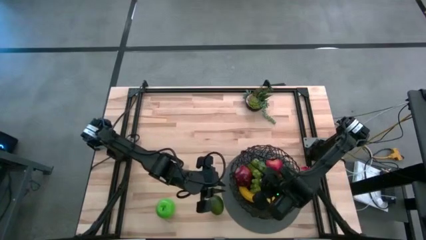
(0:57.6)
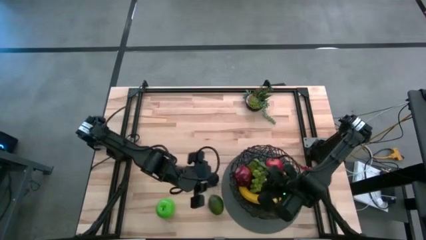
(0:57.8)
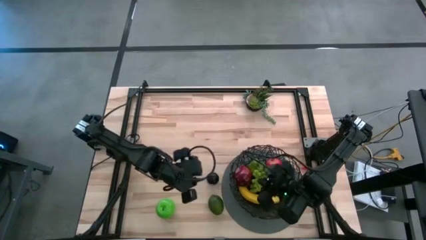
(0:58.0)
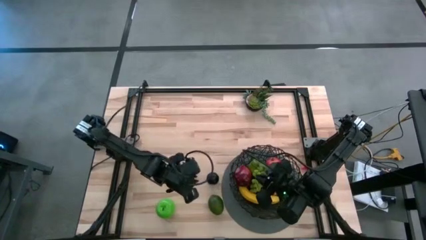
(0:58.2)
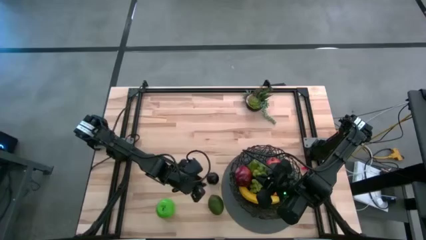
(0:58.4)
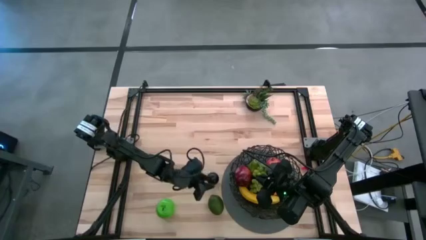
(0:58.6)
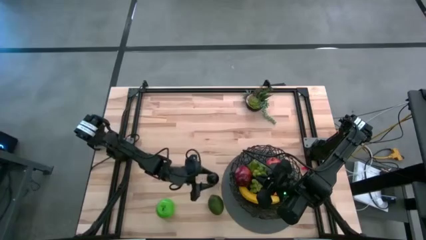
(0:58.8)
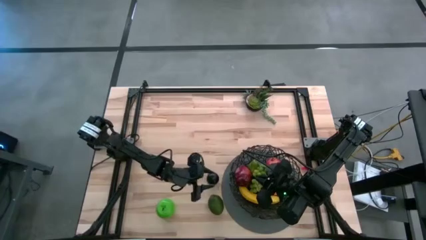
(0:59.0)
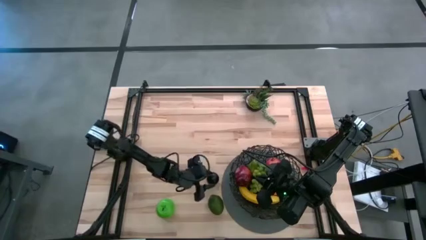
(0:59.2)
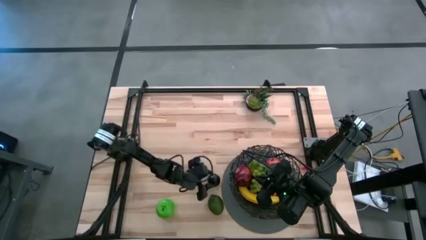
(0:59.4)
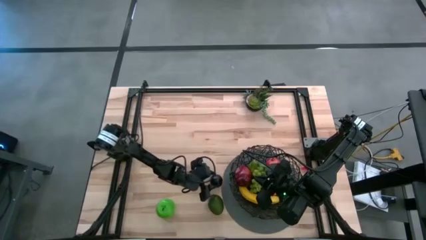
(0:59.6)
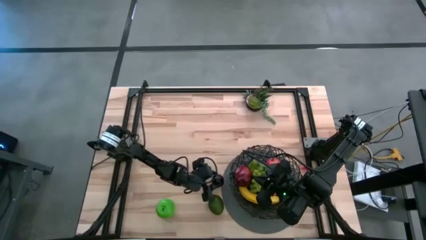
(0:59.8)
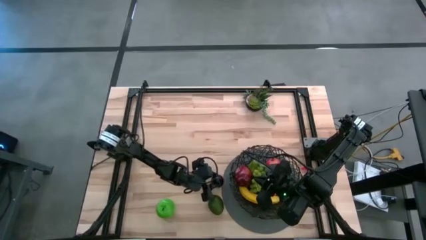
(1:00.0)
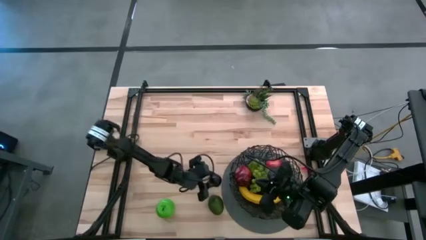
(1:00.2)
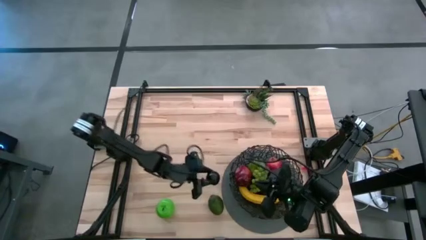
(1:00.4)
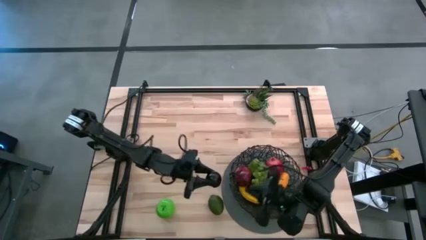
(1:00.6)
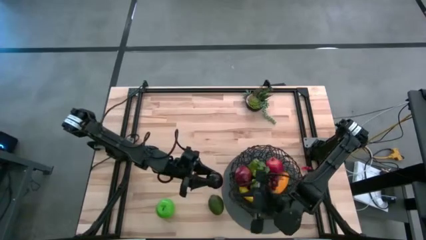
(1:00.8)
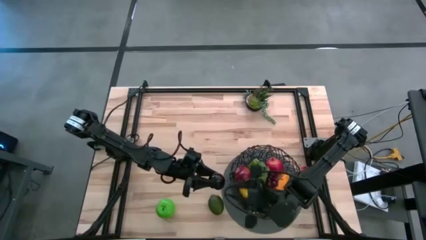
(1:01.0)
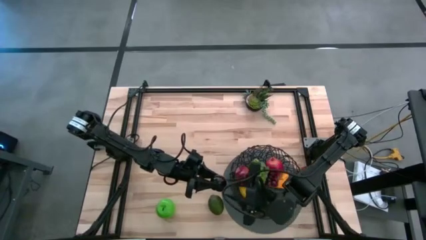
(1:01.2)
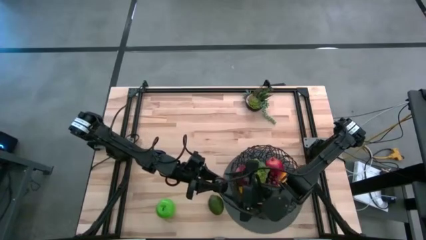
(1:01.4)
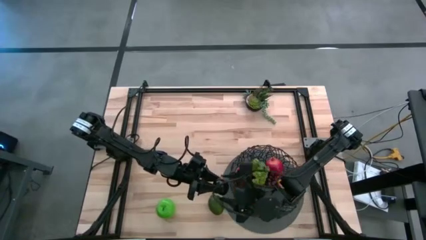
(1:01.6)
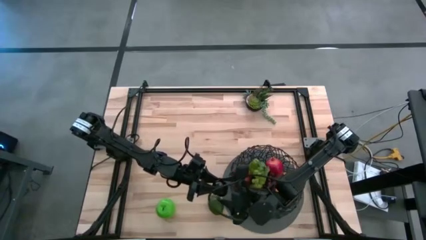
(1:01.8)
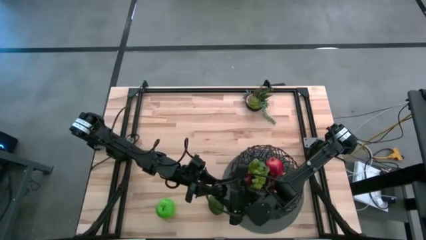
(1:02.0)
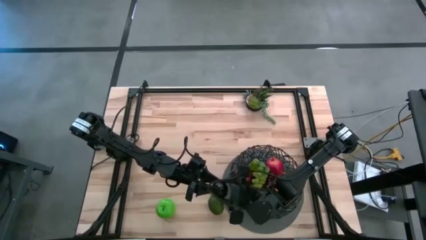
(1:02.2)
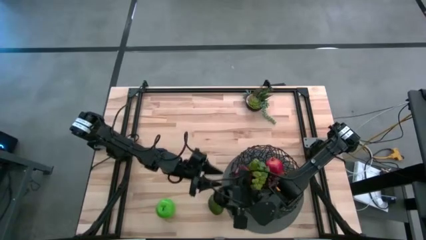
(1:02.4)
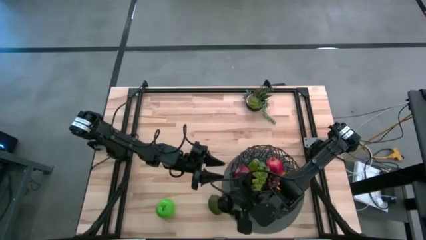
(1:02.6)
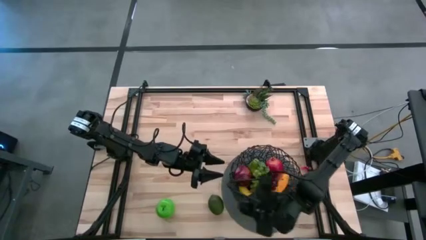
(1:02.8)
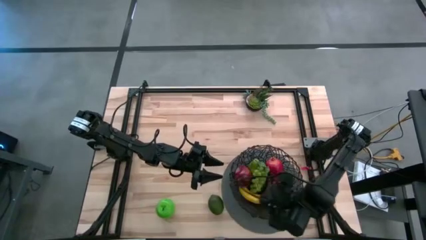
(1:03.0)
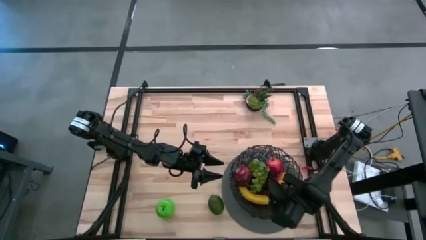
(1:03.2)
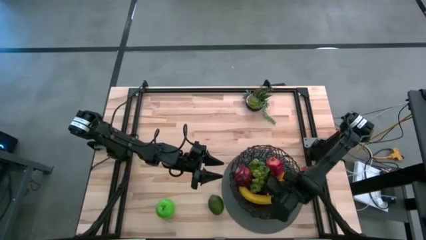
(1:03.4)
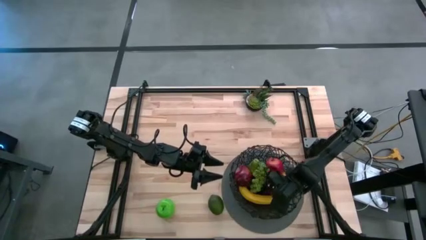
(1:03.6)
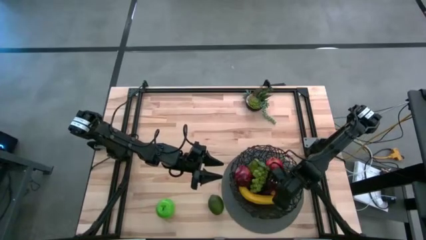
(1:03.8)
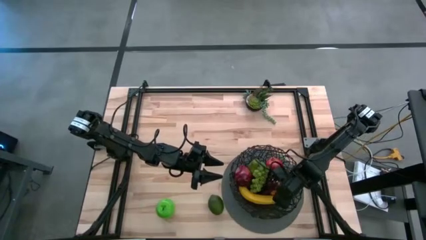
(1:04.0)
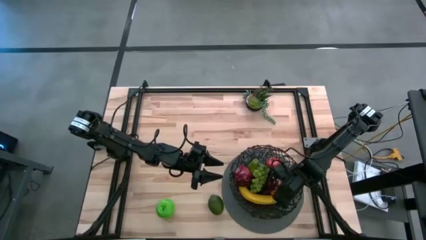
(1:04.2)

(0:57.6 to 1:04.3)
Task: Build produce basket
Put the plum in the black wire basket

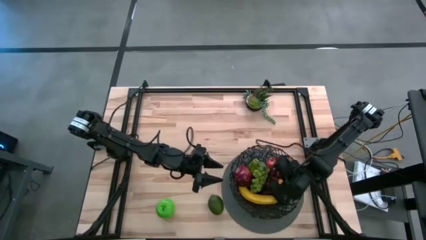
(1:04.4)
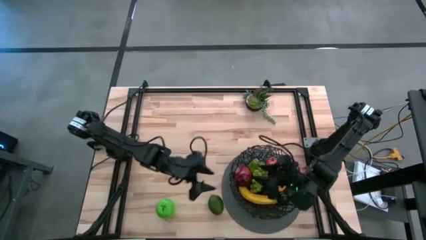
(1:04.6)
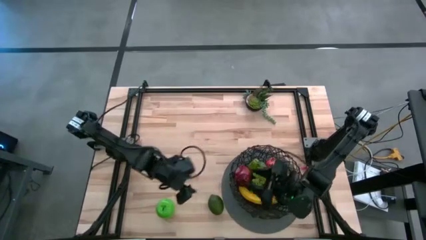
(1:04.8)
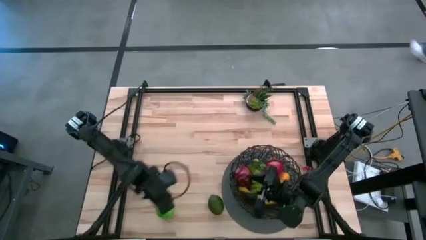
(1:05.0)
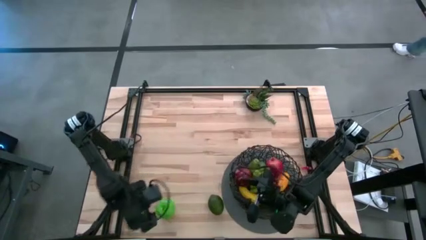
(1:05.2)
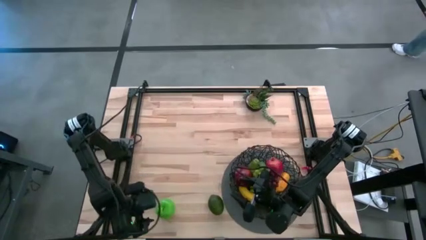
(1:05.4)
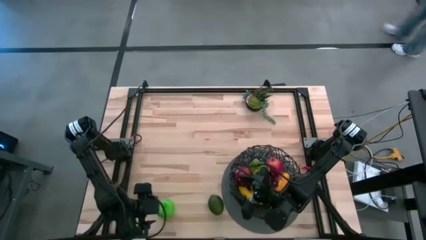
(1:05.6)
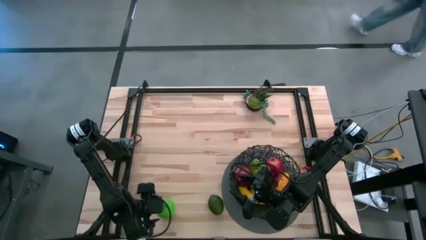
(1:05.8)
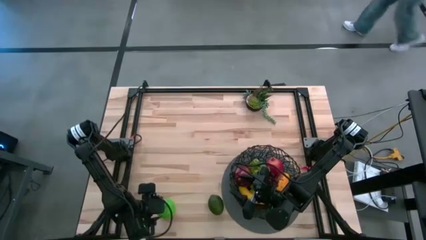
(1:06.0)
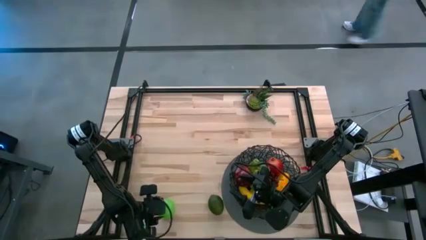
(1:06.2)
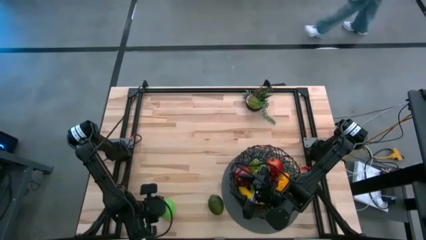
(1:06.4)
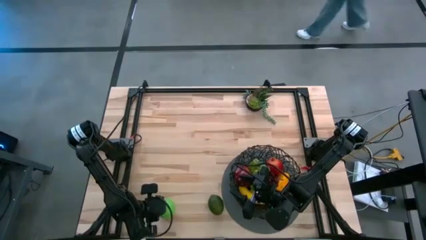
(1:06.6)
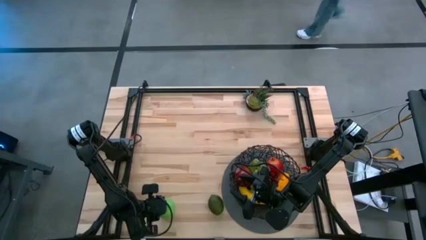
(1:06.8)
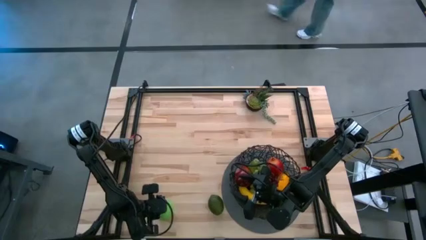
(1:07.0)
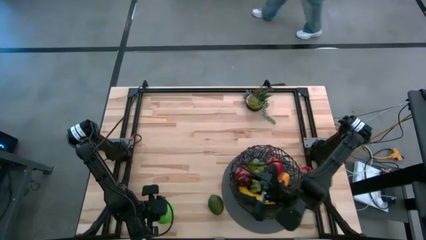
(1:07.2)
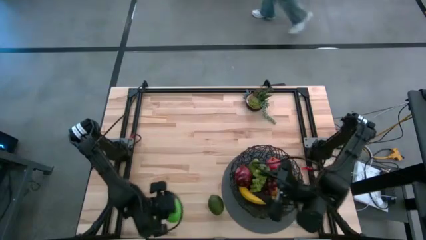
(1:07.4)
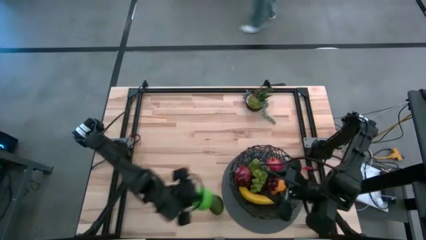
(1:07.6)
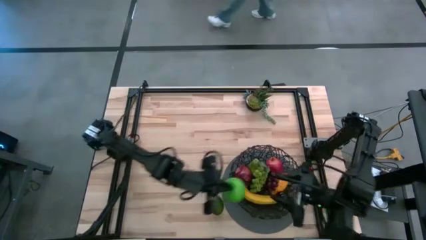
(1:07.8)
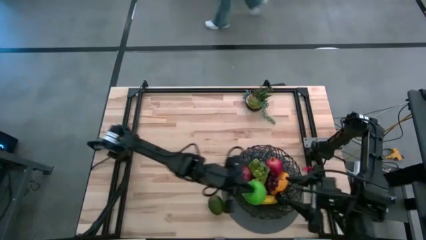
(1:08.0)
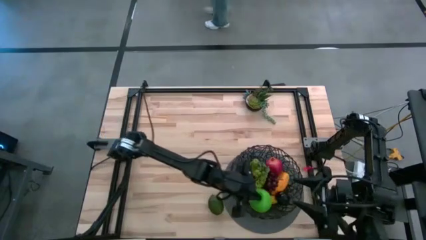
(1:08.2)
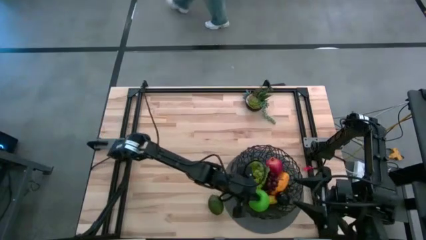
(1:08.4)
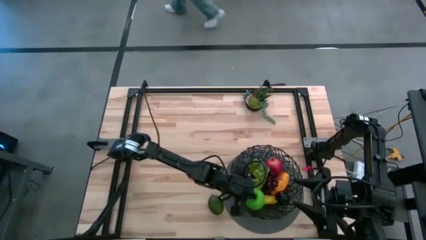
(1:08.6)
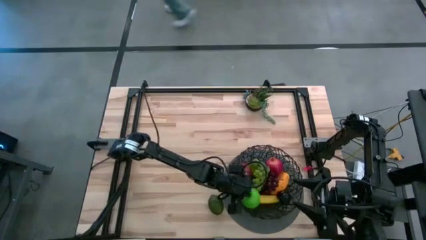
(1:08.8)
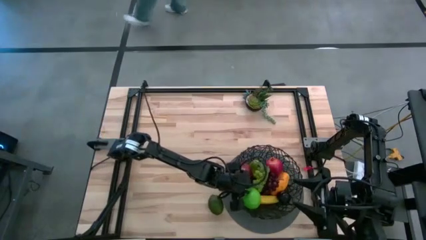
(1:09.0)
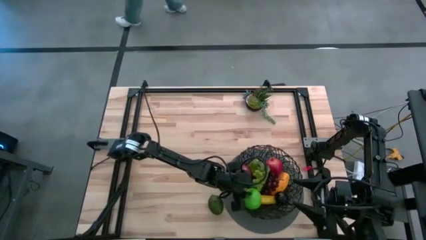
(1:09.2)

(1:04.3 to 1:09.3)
Put the green apple in the black wire basket

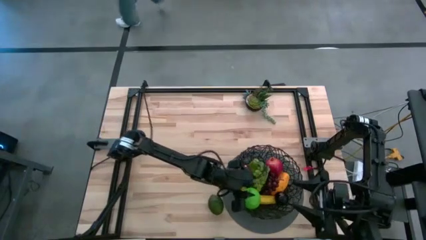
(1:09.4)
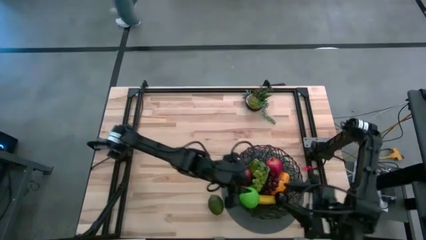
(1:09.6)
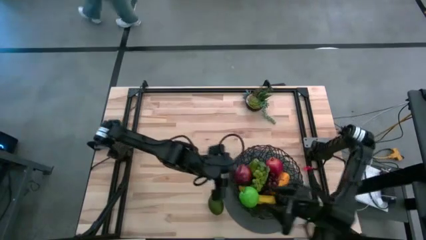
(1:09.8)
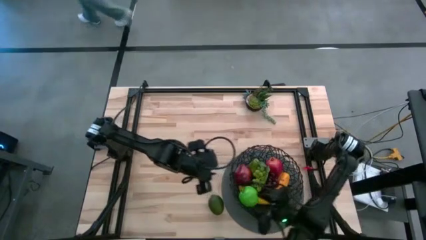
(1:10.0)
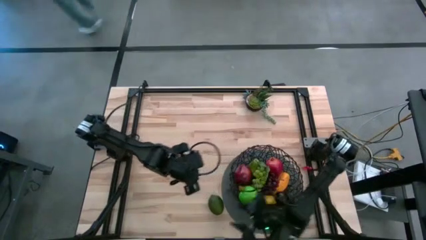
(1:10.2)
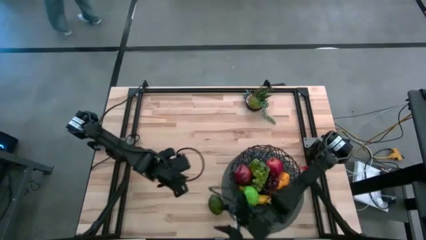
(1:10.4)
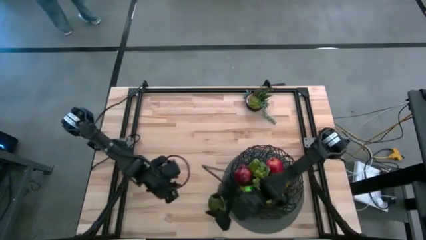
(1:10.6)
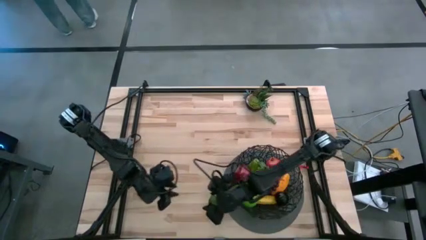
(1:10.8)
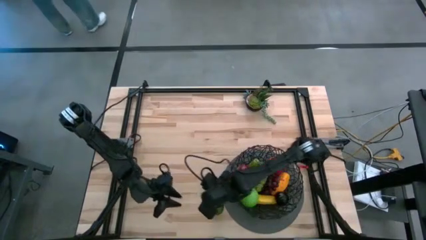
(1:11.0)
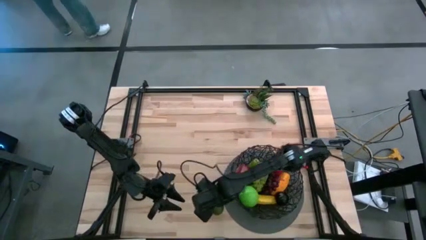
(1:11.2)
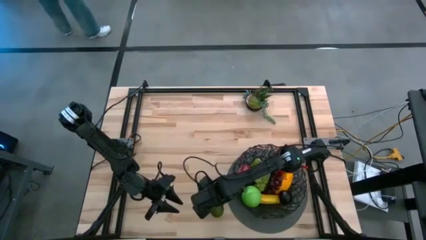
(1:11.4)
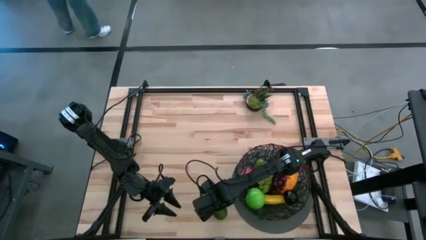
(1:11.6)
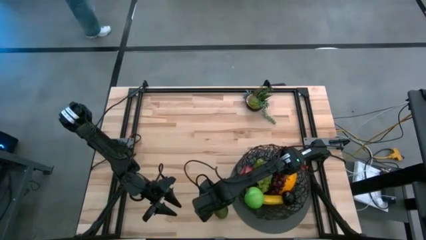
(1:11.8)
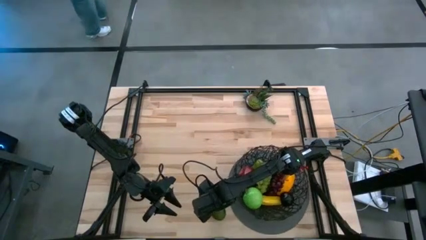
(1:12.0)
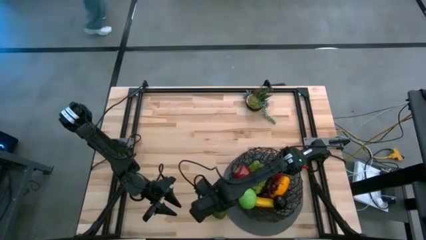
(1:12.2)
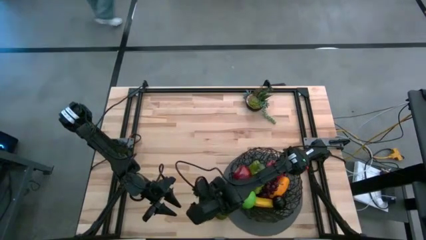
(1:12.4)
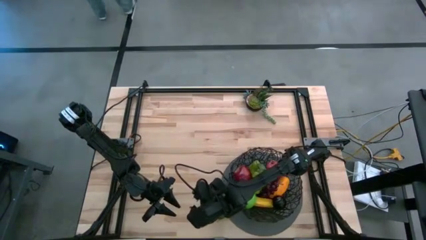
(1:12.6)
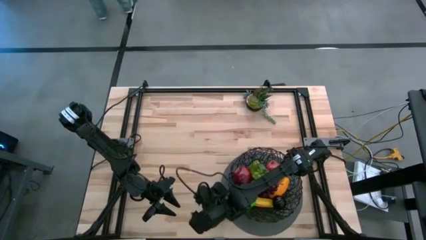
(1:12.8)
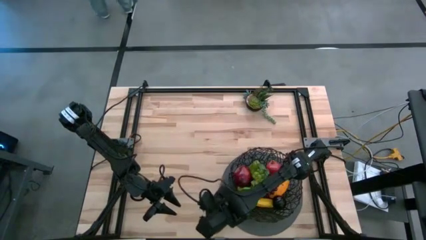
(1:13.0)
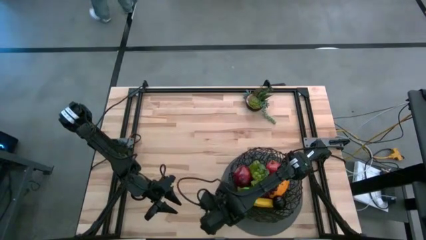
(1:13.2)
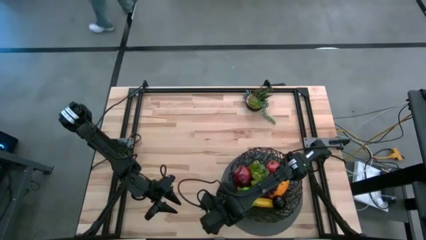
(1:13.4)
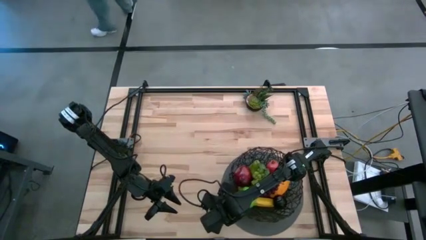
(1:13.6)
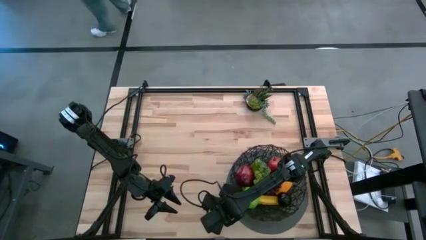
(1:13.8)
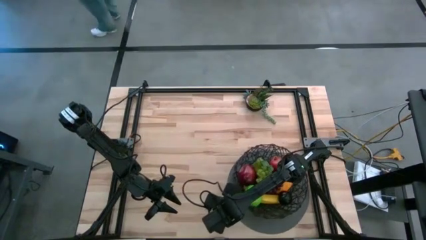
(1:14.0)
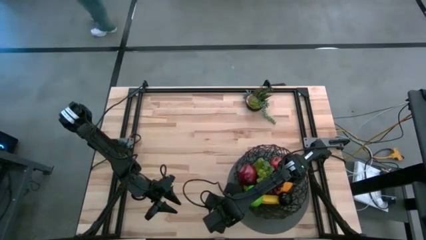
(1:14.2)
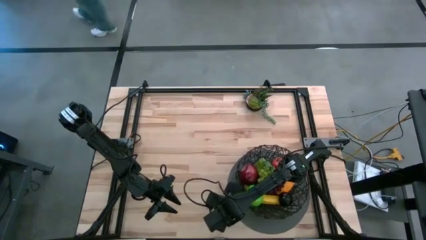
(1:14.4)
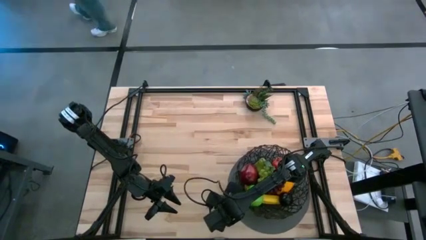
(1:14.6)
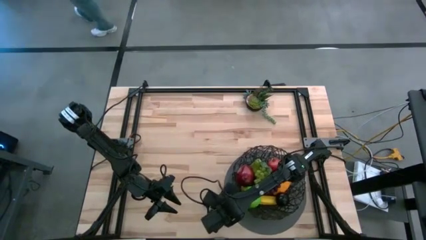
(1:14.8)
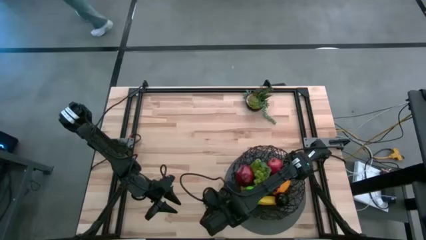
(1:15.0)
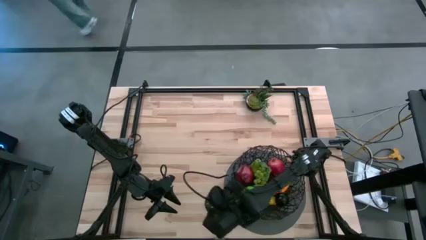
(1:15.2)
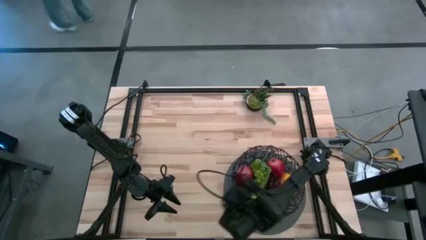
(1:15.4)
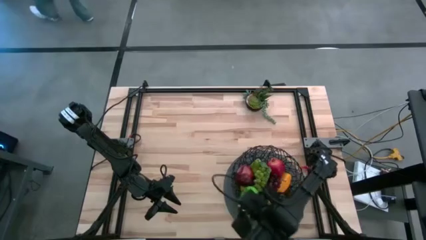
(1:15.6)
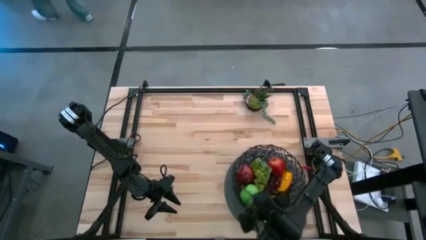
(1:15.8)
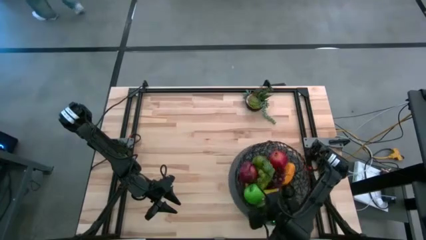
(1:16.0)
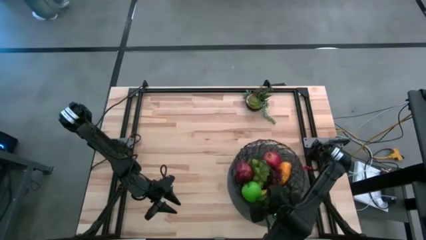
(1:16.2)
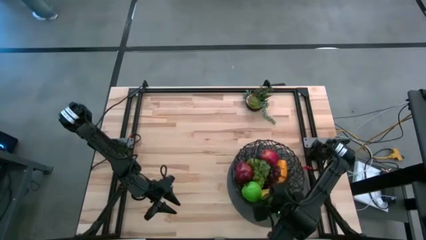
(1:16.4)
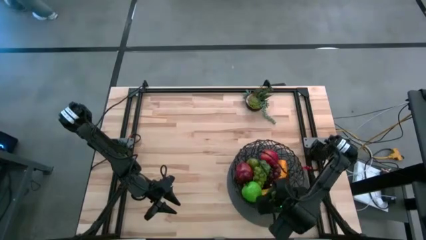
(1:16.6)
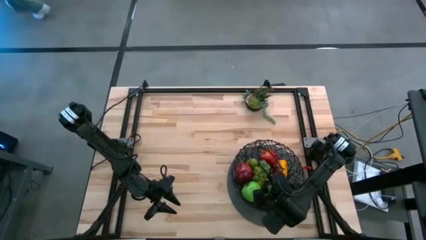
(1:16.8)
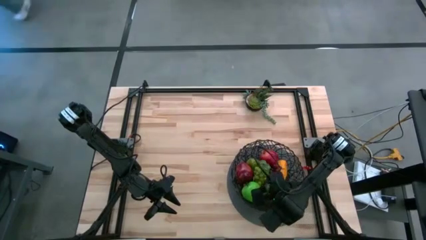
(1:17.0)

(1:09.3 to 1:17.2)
Put the lime in the black wire basket
